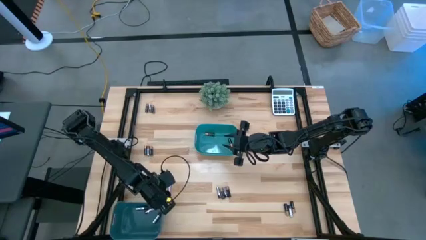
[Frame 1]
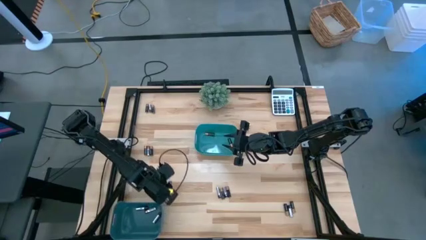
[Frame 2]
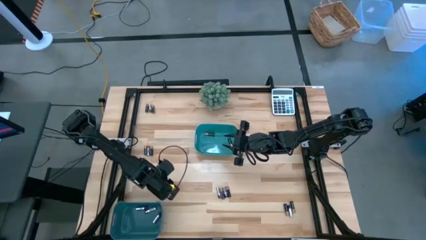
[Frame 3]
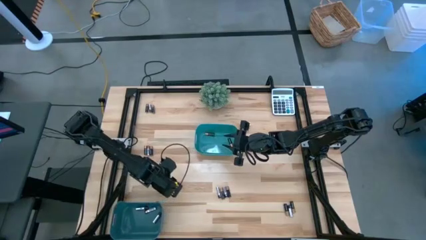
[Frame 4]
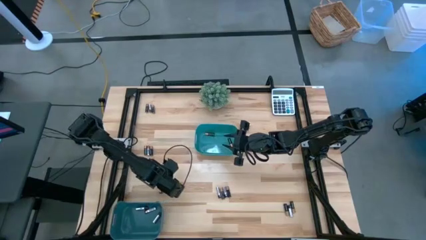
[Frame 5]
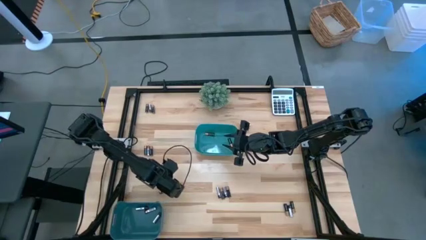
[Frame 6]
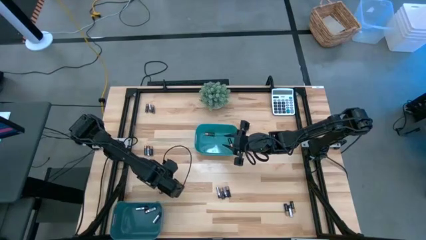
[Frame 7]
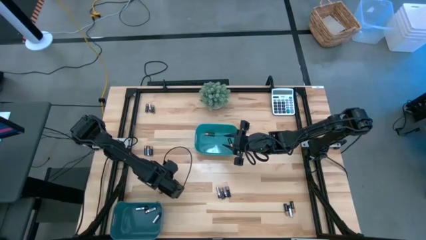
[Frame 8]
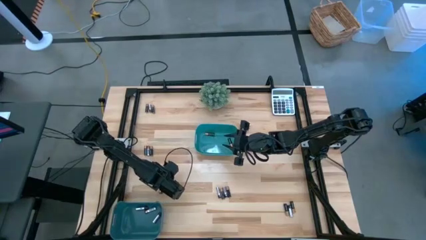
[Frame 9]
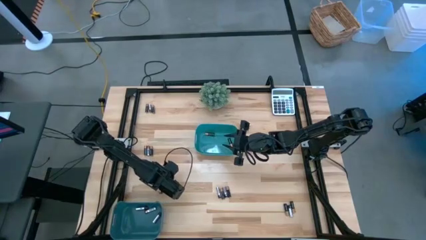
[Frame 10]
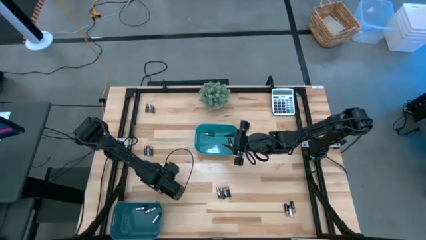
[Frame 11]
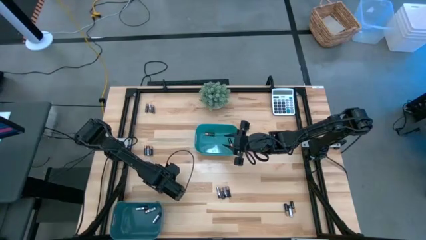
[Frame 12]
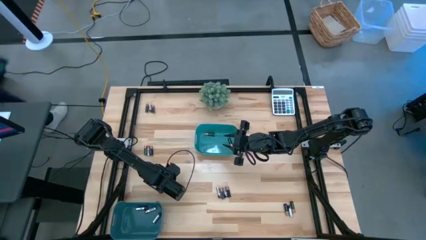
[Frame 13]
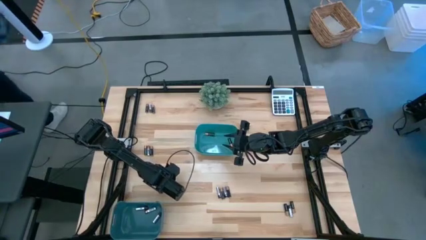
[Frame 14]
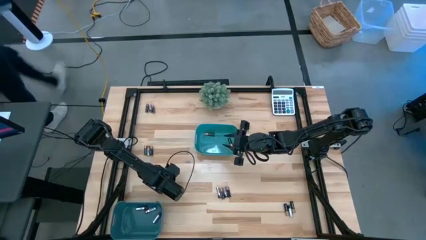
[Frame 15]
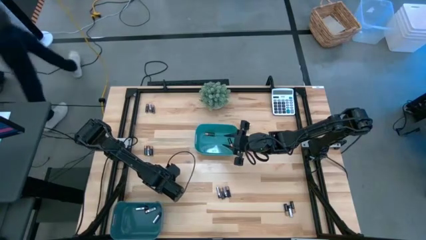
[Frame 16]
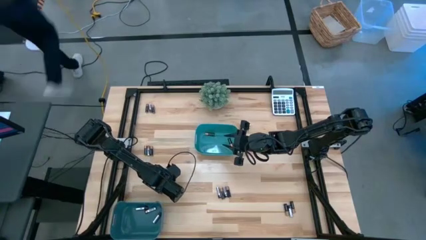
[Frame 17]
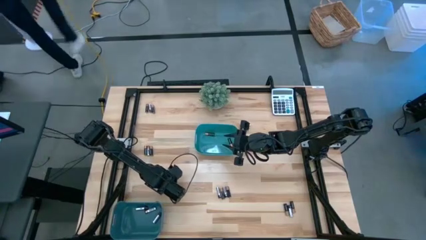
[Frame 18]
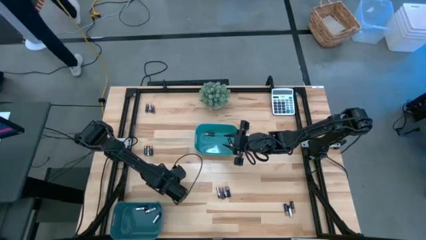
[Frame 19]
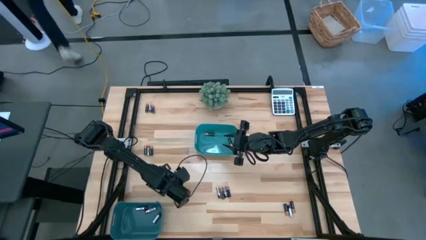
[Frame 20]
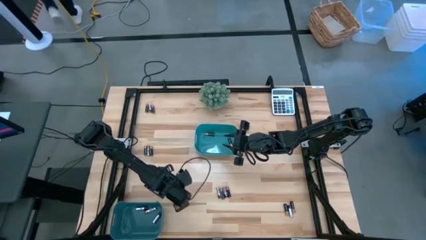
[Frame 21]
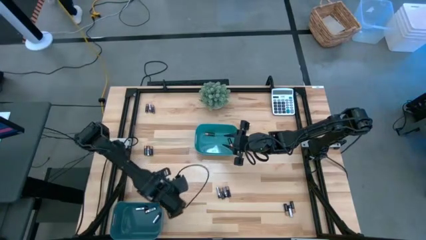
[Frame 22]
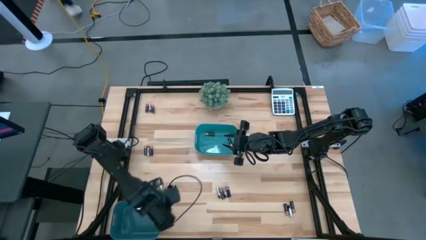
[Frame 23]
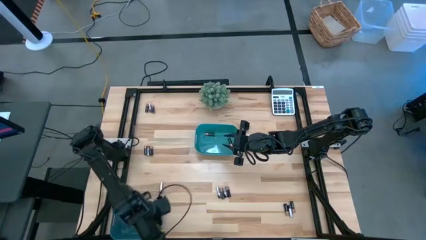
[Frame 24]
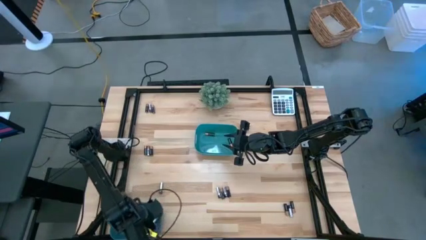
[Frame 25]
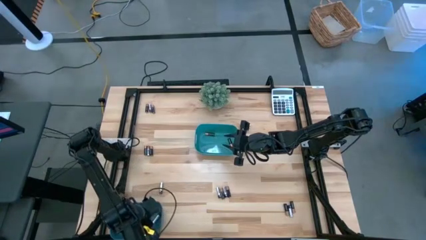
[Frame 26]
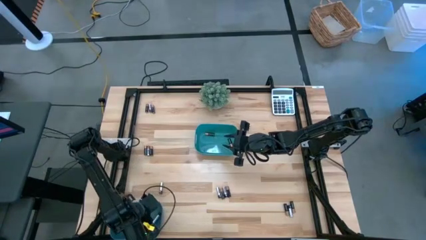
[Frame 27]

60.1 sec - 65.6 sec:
Task: Sort batteries
Put the silver battery into the blue bin

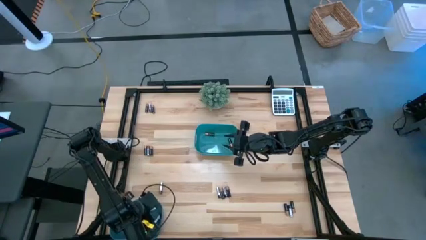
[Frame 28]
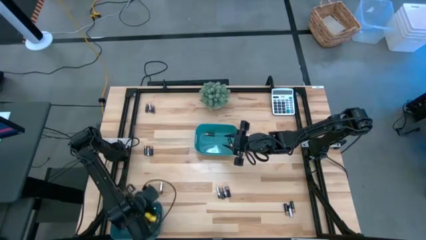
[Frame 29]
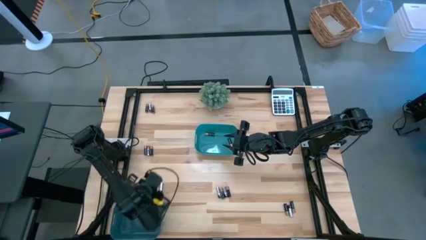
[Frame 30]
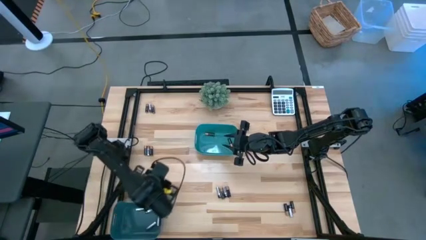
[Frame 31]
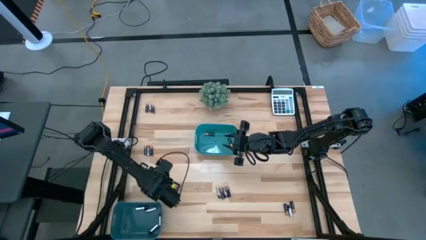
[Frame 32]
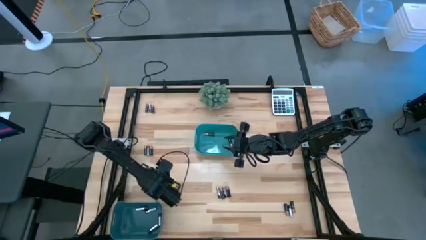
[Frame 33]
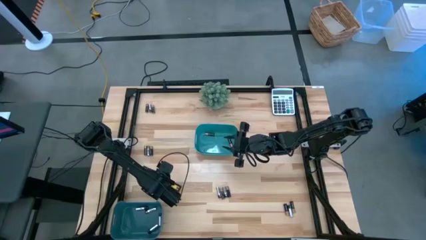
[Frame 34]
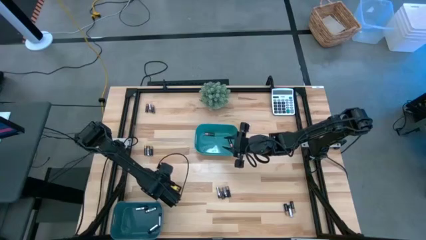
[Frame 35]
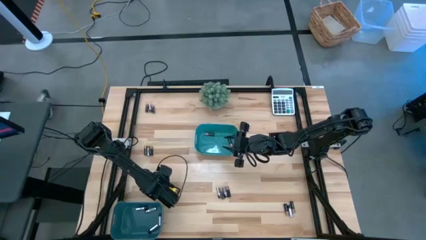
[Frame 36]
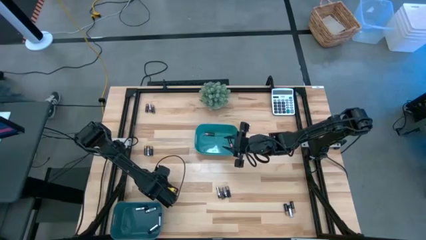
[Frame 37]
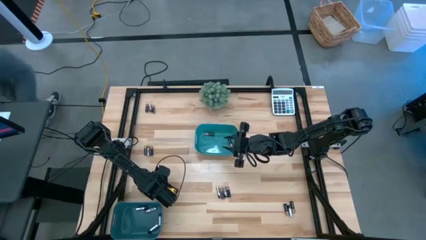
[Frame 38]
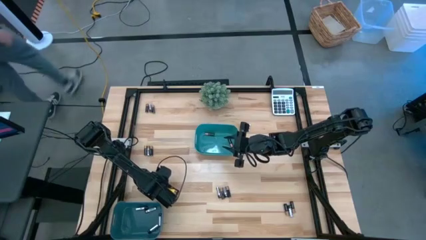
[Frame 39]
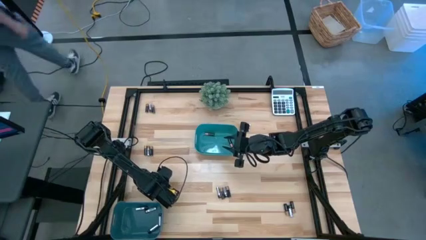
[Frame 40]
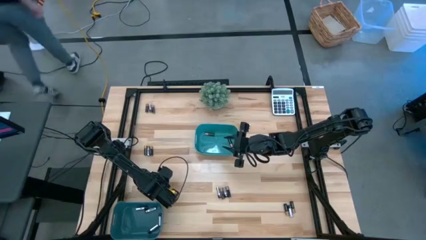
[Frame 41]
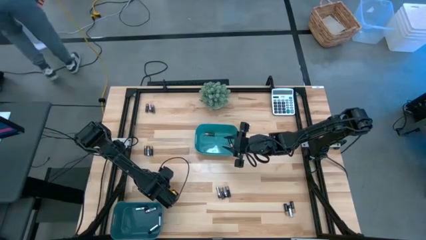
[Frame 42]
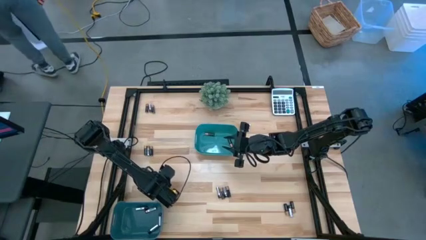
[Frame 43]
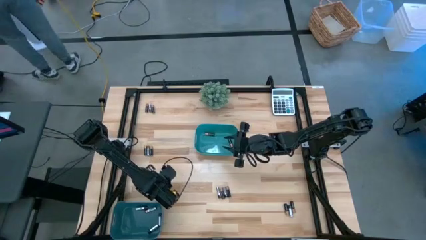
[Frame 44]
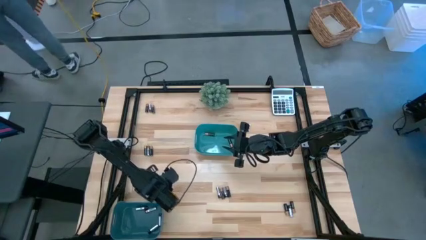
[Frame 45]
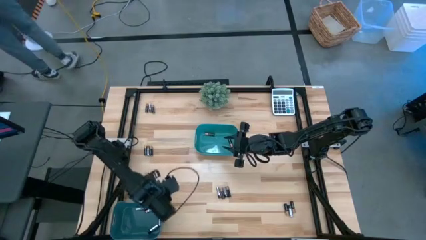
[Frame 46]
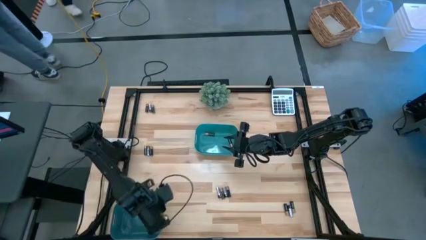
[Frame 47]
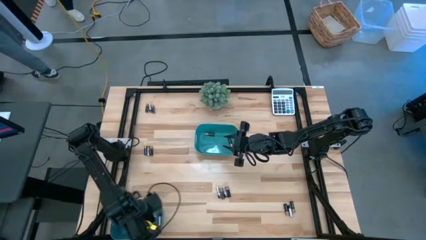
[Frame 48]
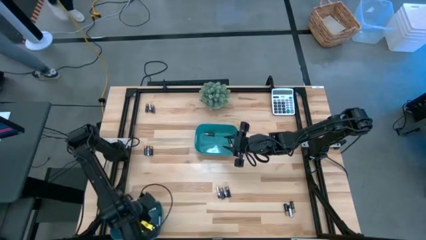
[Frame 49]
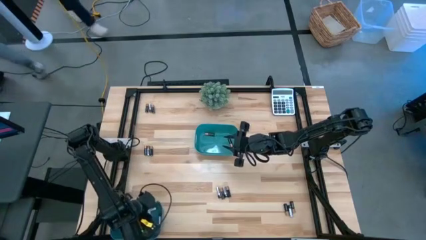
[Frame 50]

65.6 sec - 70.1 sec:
Put the silver battery into the blue bin

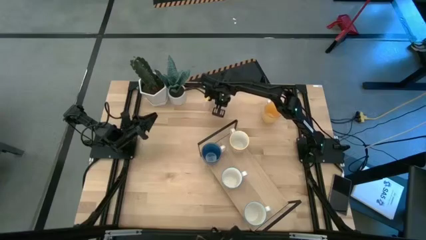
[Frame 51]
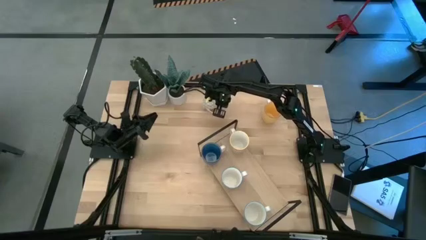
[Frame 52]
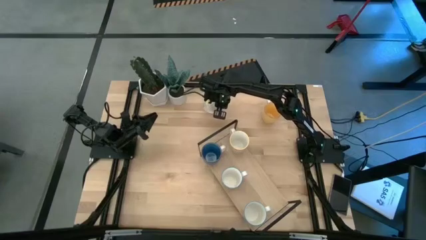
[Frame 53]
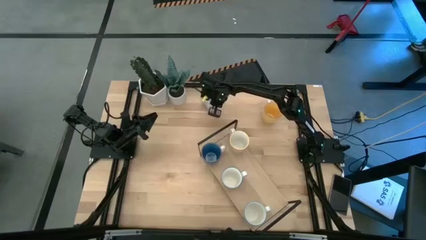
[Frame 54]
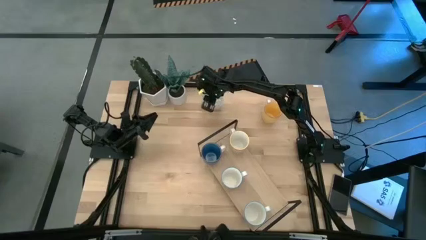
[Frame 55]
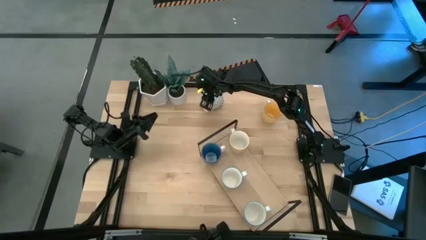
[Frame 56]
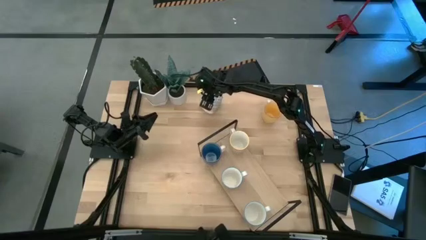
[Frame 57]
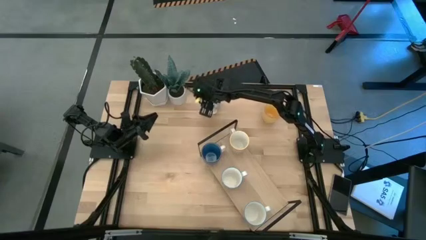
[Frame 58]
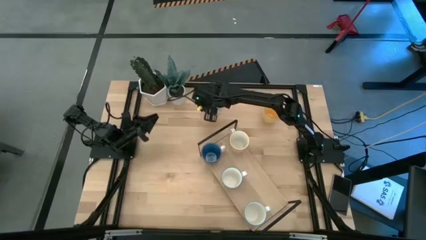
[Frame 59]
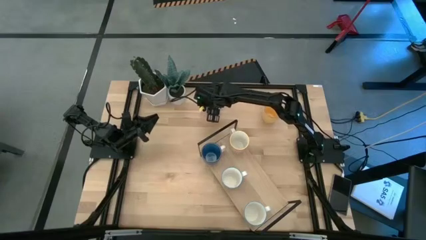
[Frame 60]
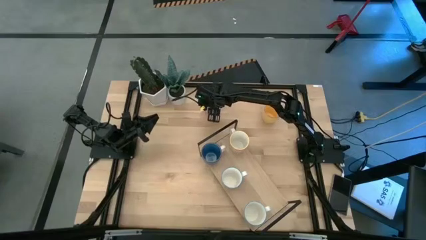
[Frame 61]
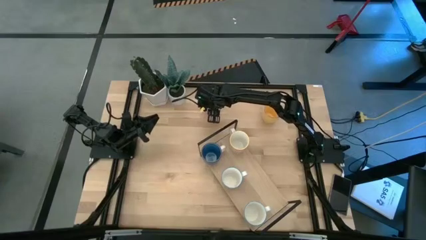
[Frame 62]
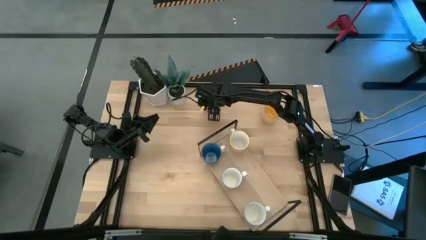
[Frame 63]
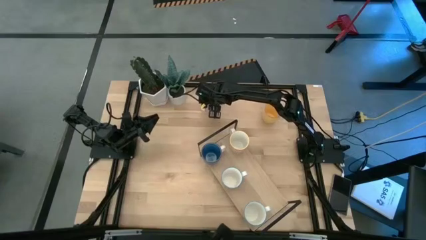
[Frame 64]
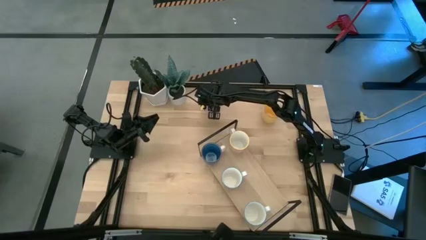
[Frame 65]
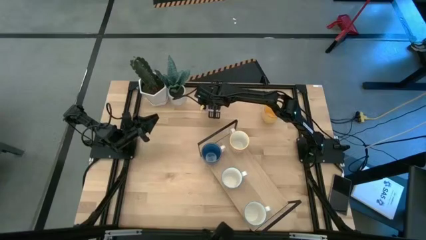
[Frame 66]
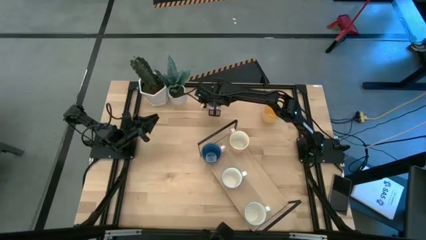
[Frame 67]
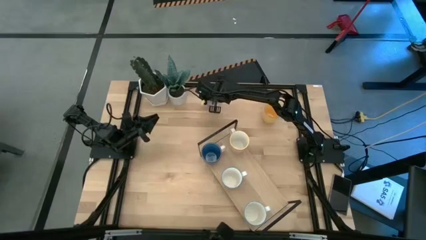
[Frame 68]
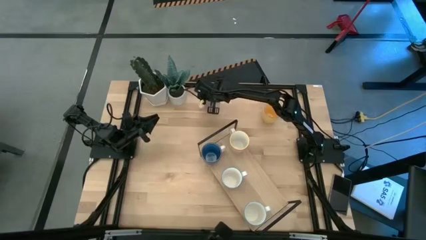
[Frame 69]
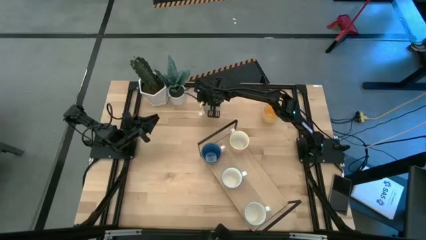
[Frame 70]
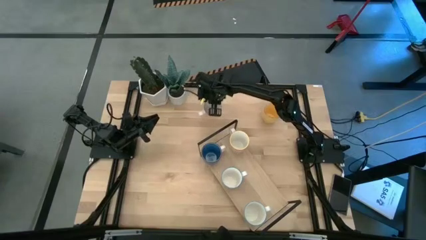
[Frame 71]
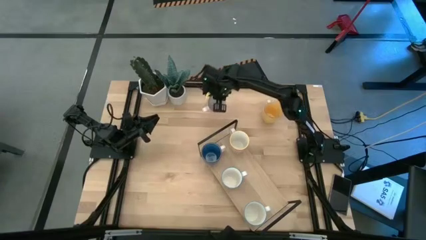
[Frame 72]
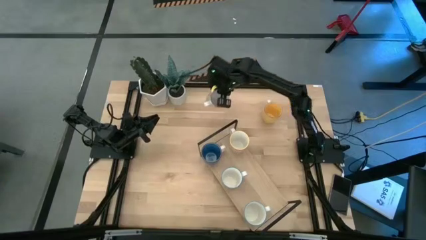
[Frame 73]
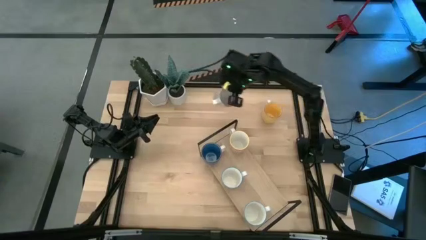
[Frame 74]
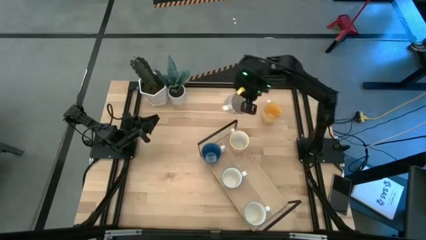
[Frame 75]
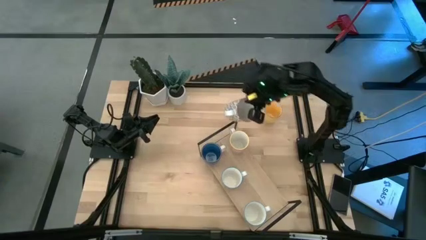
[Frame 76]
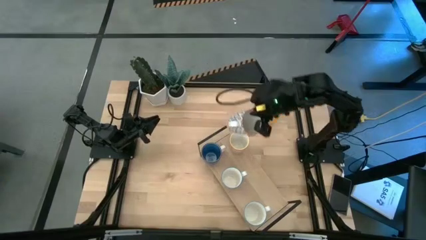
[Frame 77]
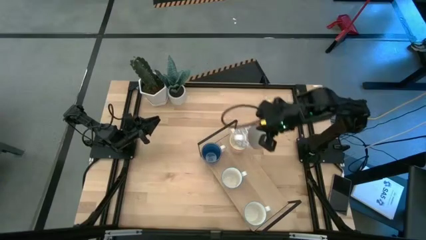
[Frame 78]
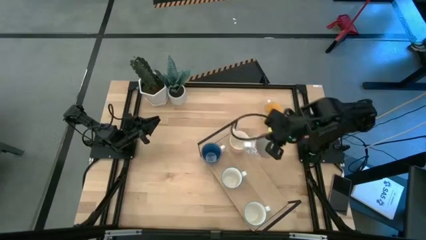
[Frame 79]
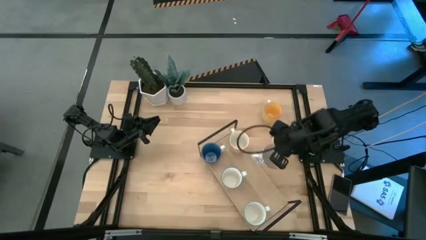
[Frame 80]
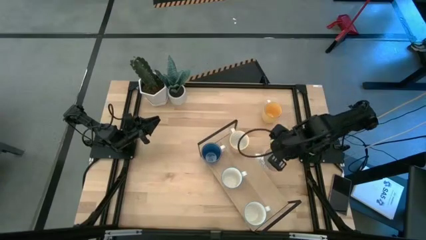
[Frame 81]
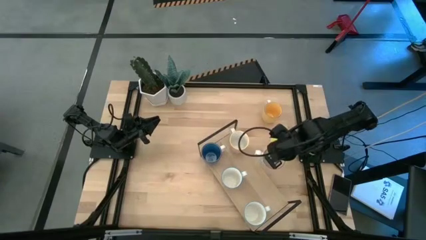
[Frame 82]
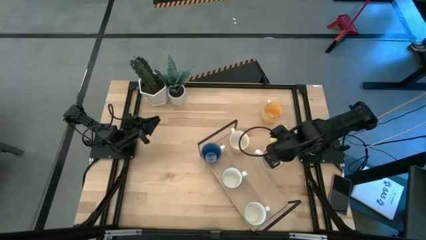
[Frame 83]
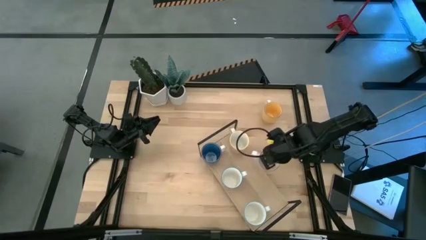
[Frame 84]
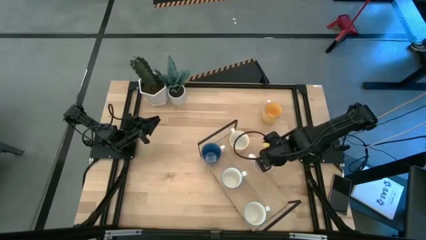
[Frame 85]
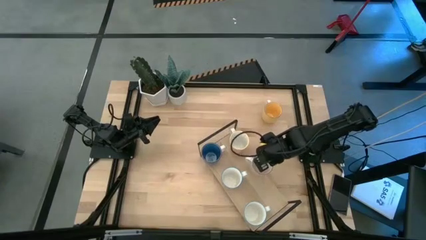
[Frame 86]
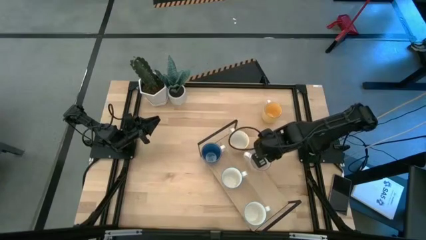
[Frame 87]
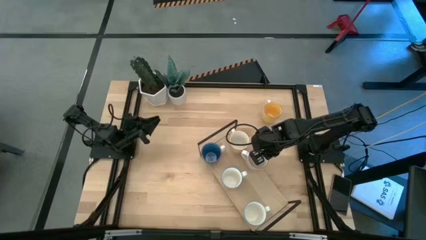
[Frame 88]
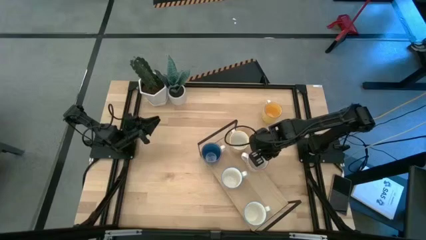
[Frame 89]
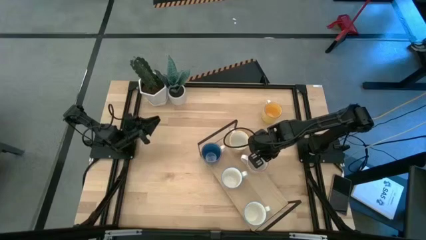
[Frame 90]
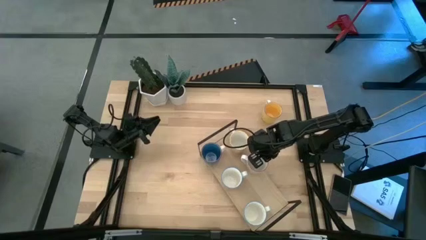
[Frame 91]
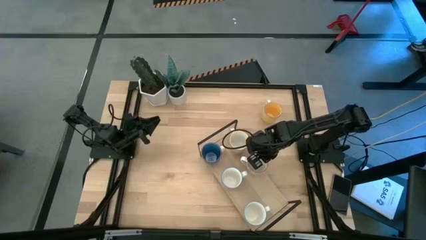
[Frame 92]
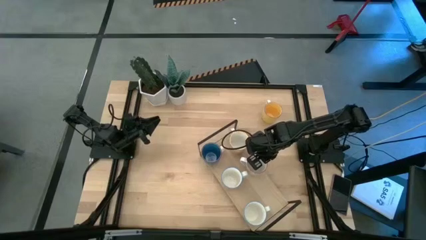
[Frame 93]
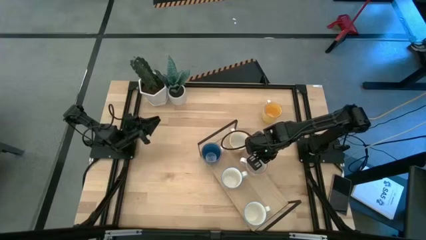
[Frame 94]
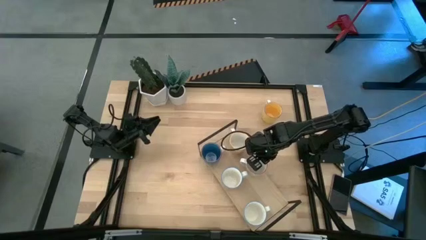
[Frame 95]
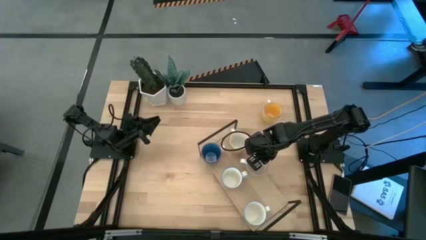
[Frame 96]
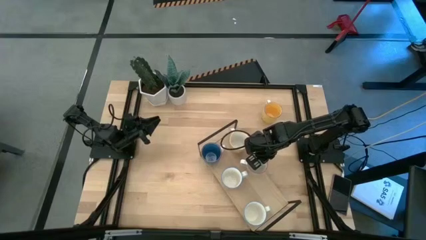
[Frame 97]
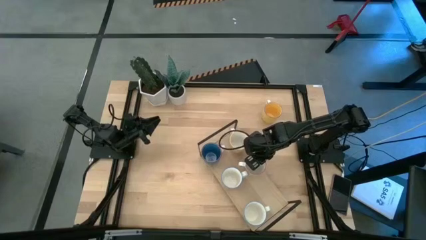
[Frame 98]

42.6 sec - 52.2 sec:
Task: Place coffee mugs
Put the gray patterned mug on the shelf
